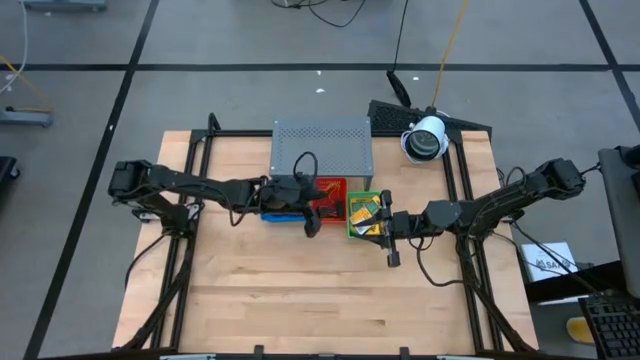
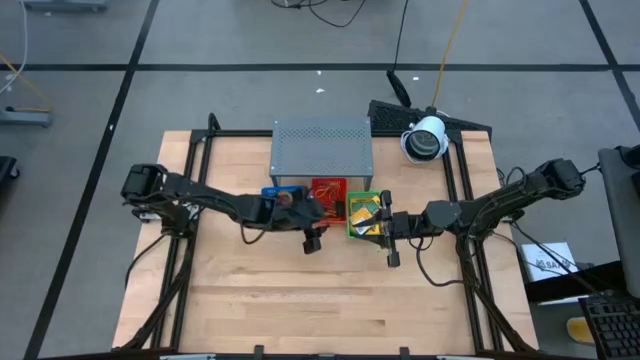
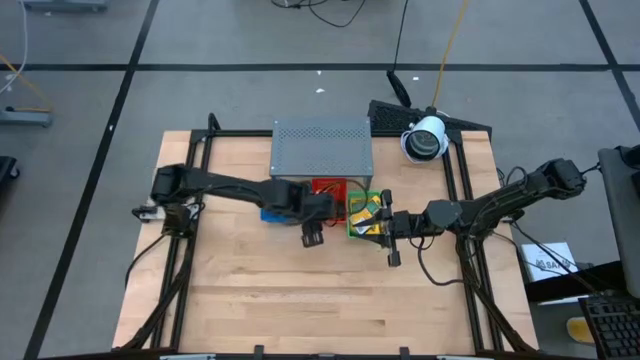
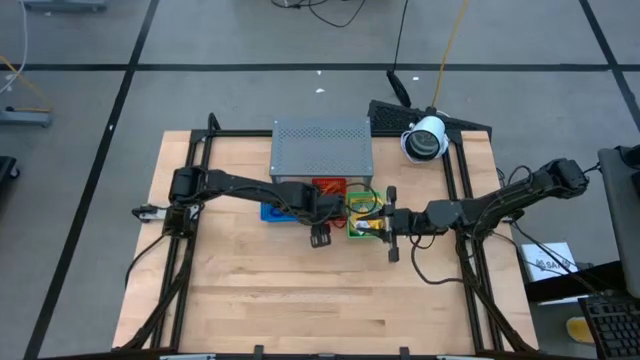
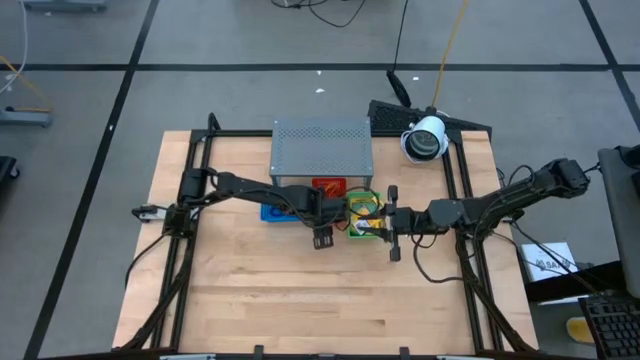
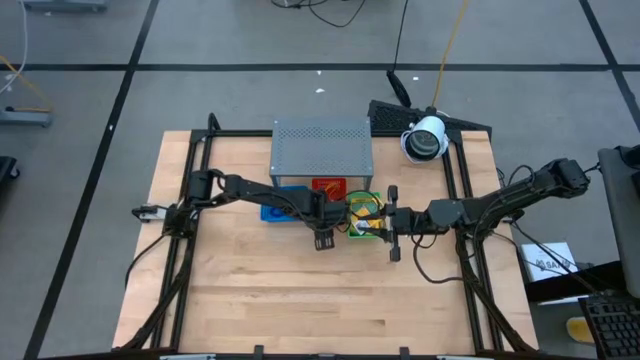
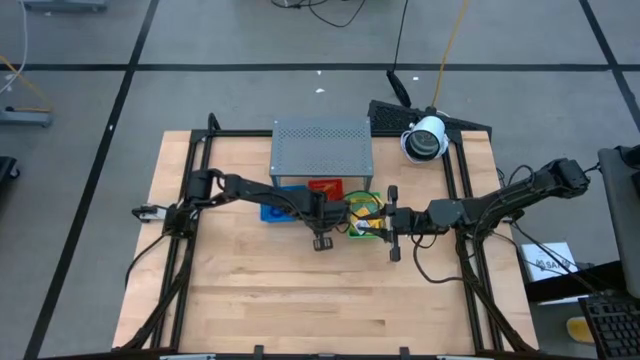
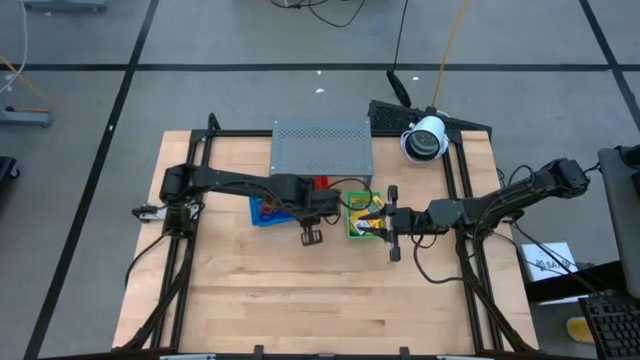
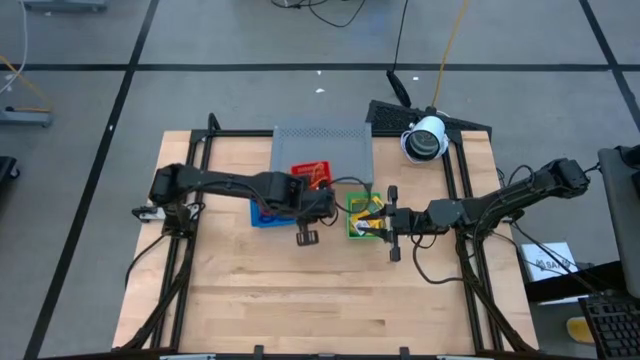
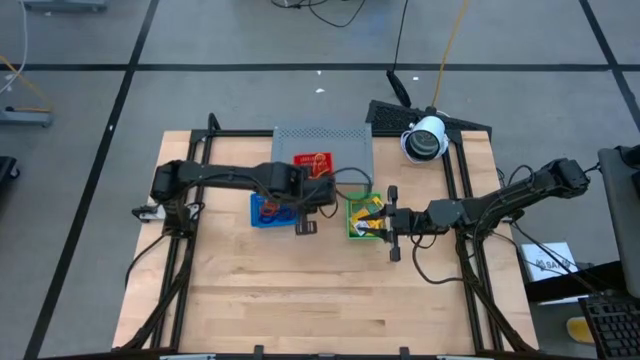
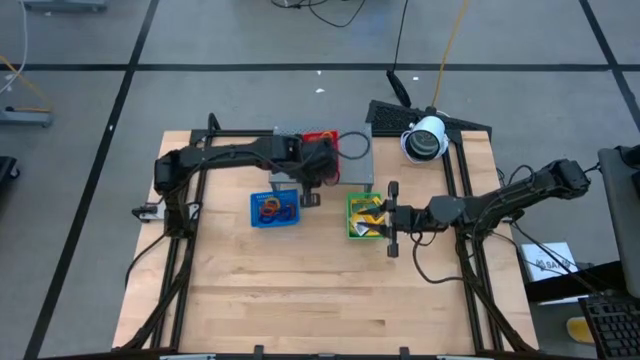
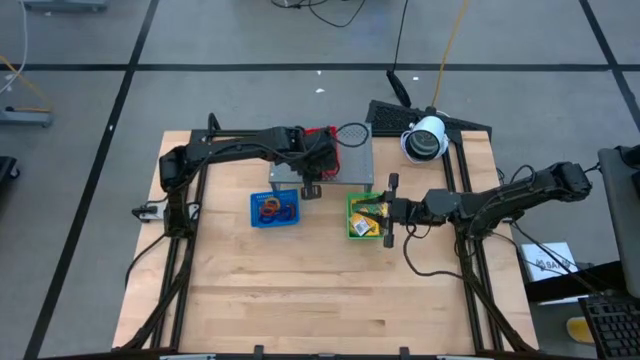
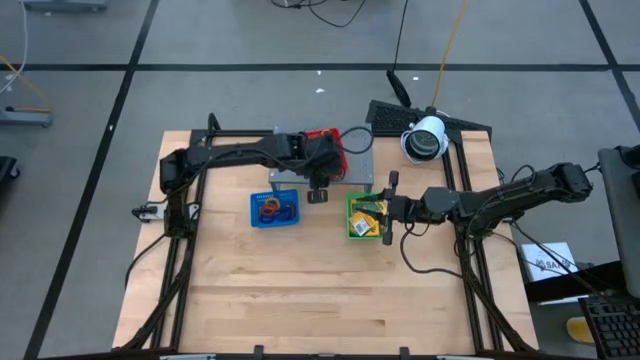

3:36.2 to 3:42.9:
Task: Pick & Place Office Desk Supplies
Put the red bin on the shelf

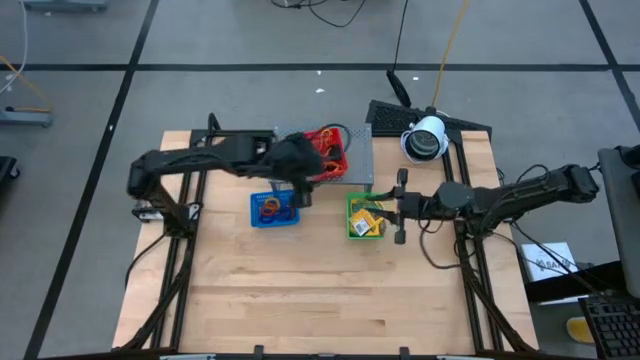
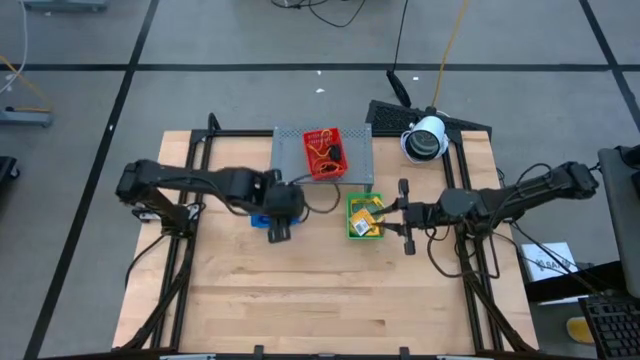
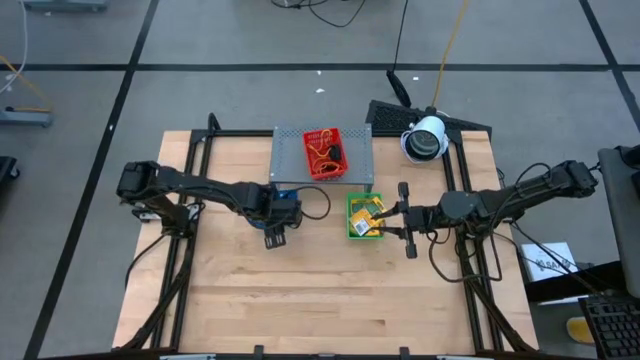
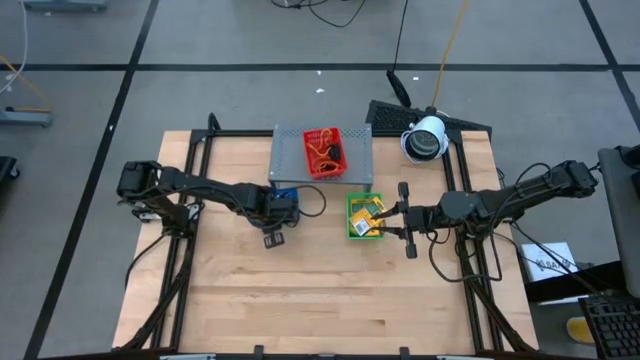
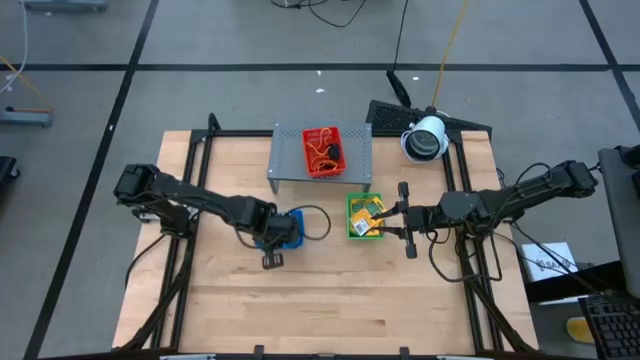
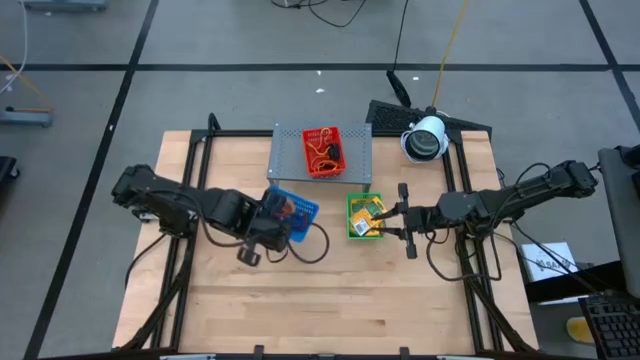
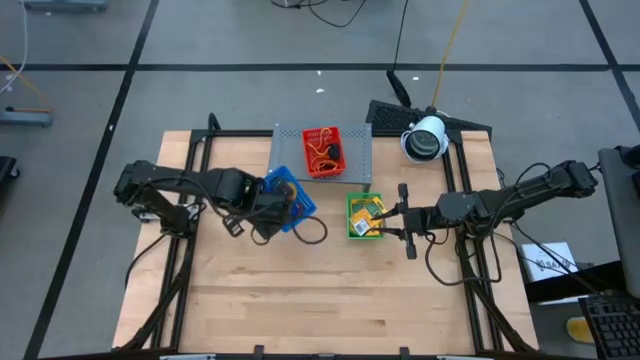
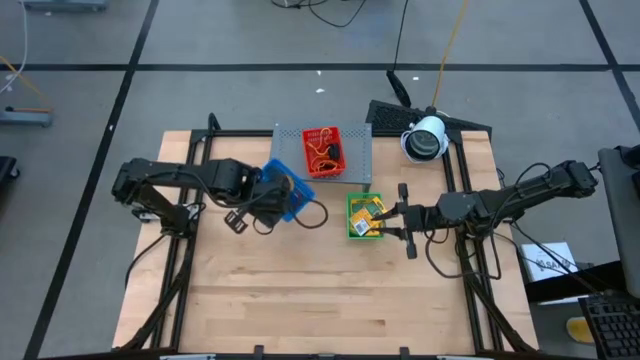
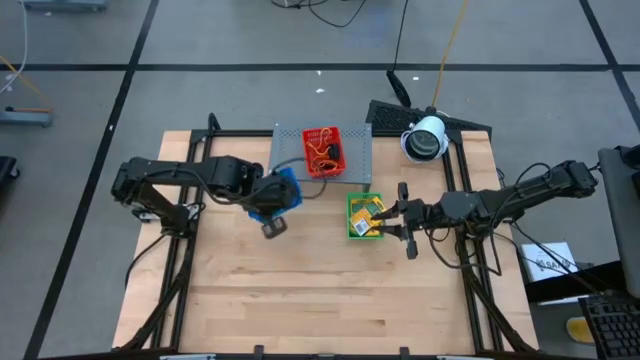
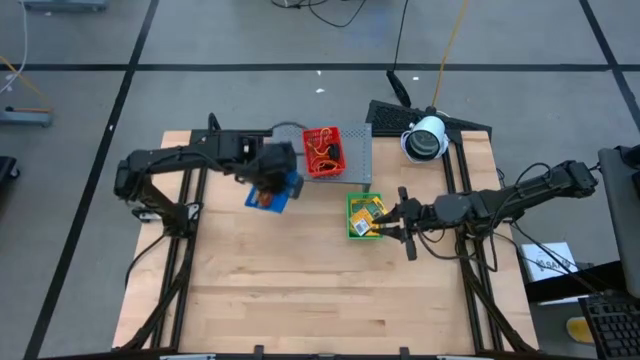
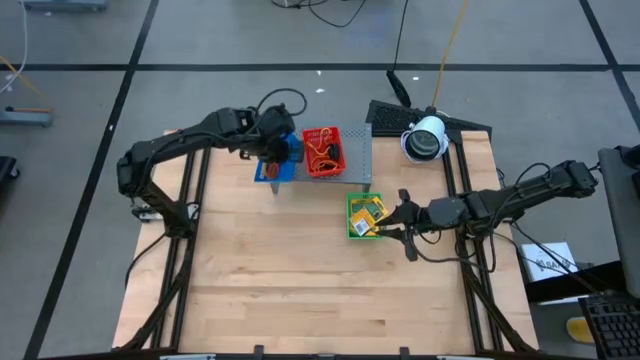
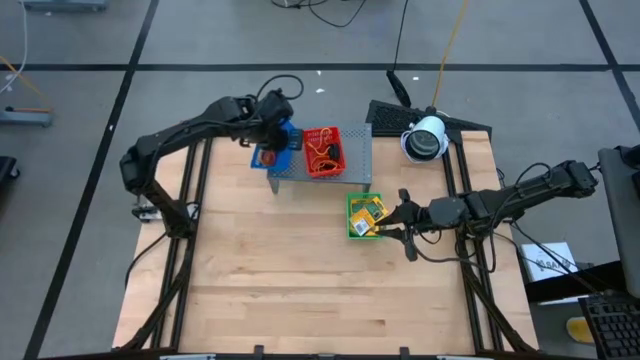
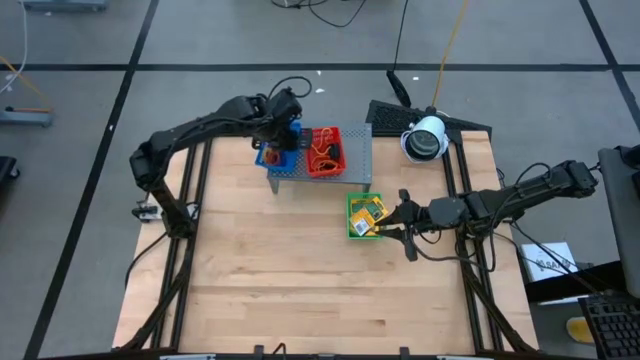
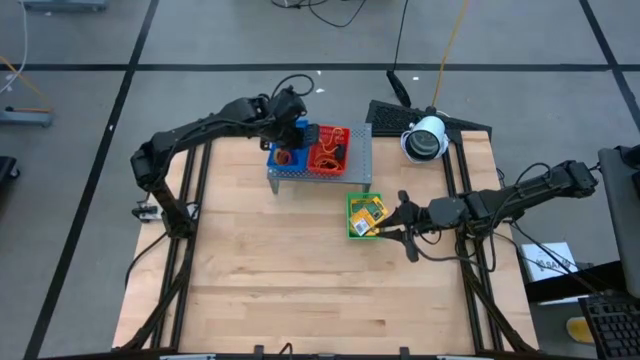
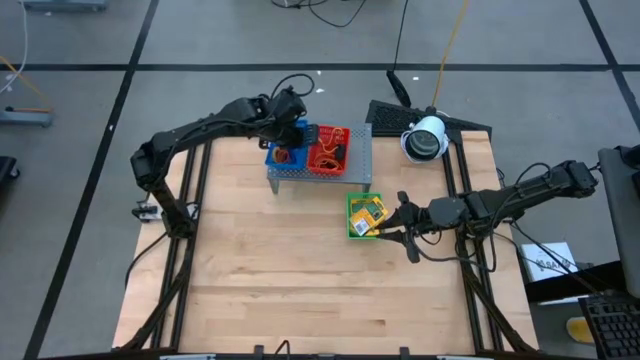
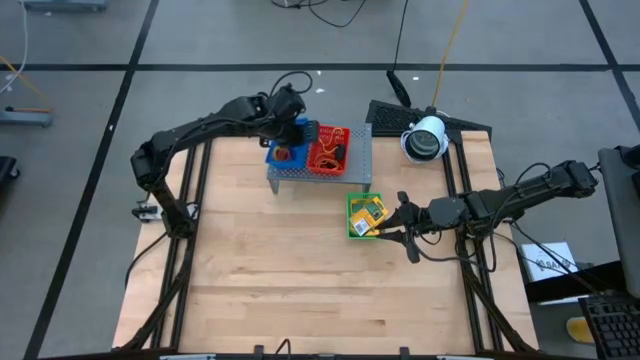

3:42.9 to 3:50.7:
Put the blue bin on the shelf

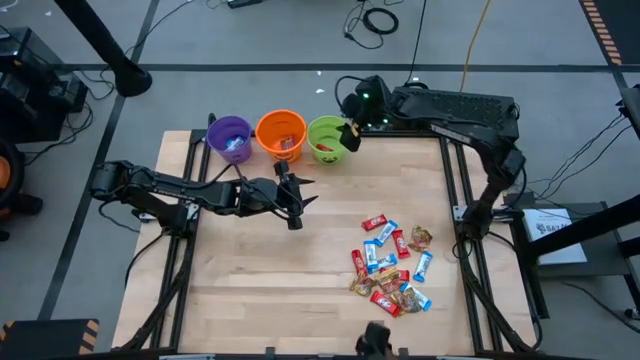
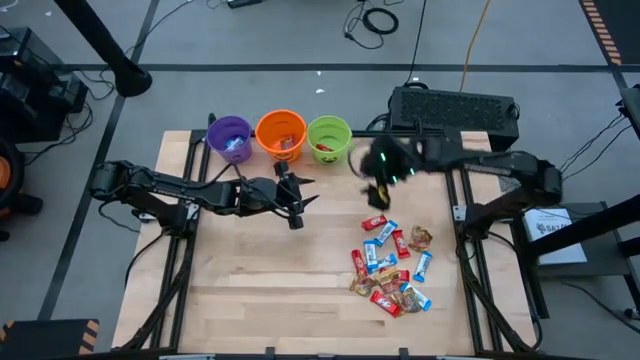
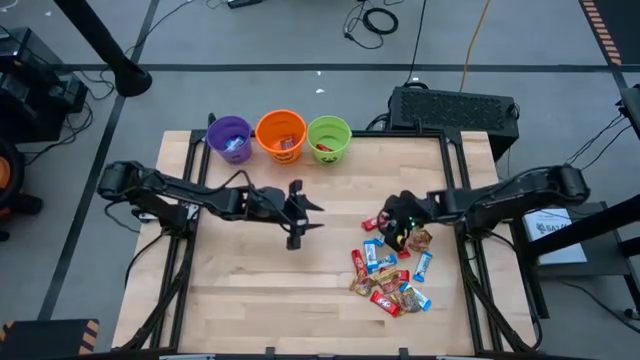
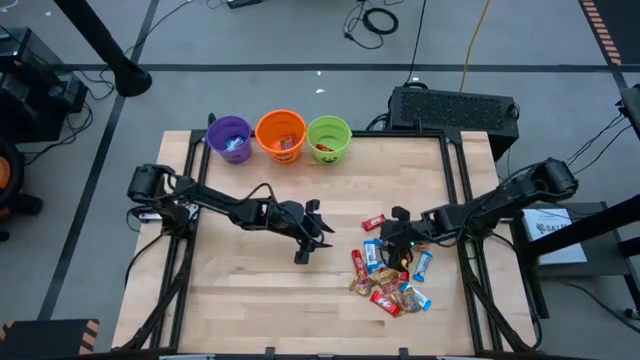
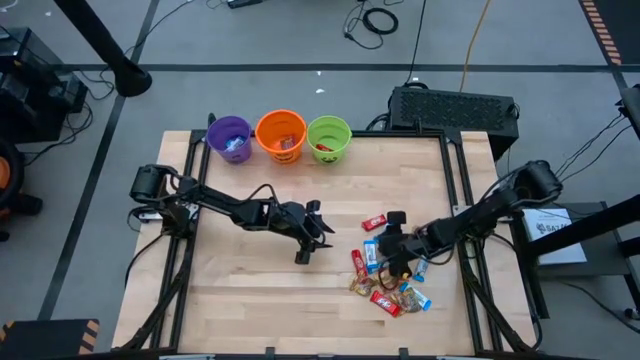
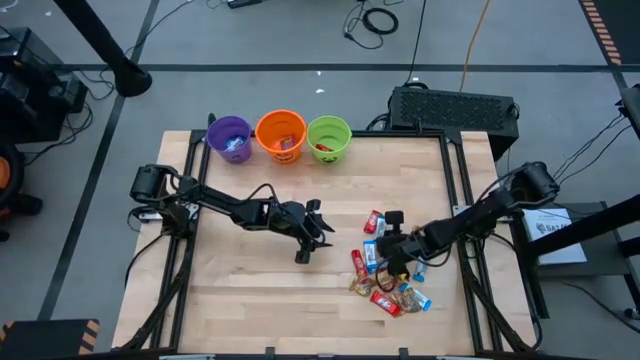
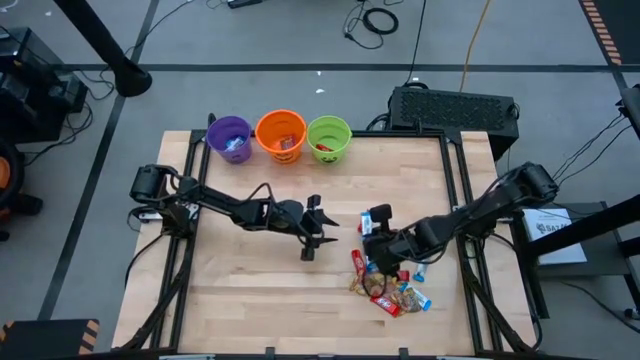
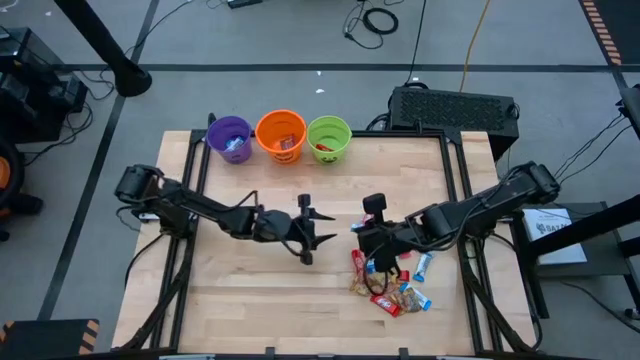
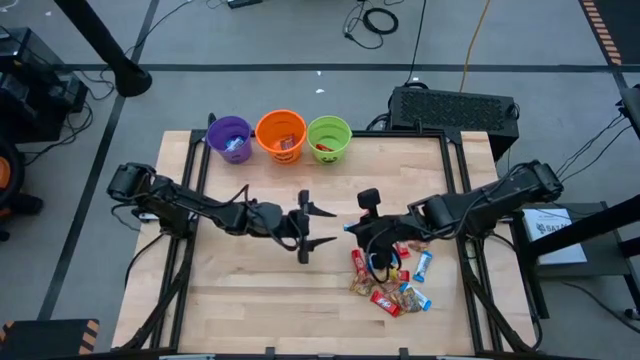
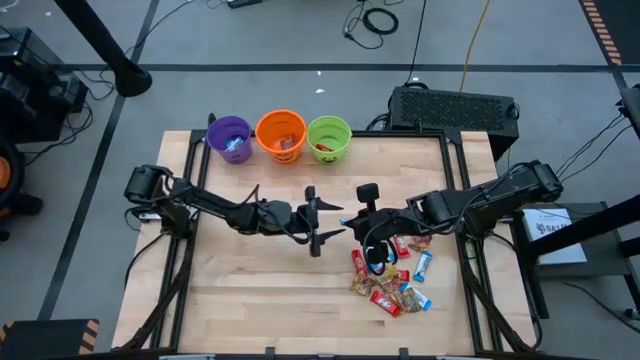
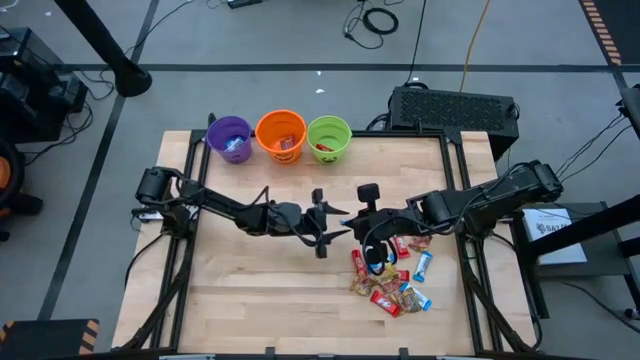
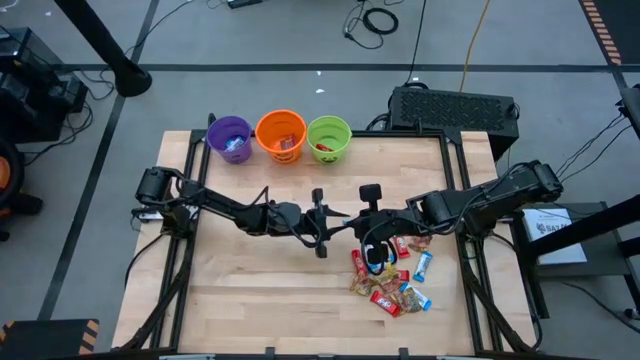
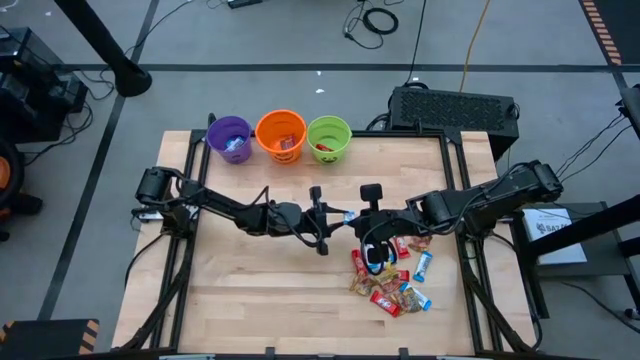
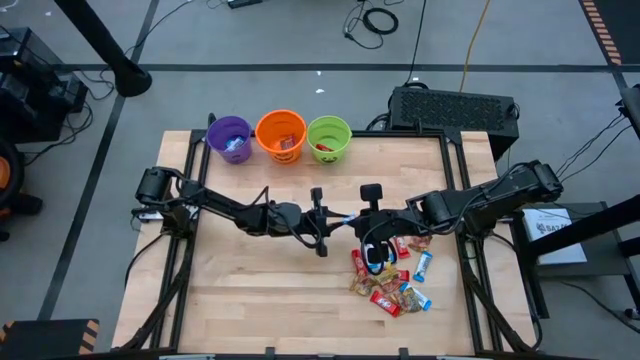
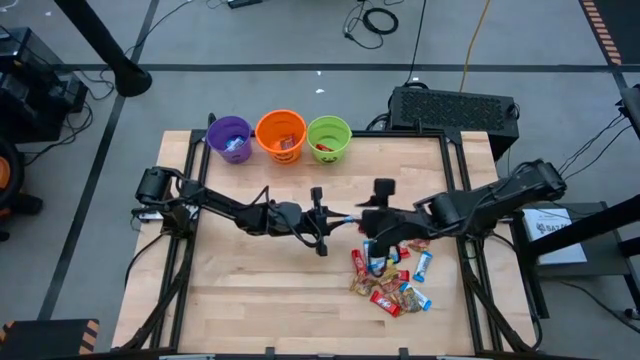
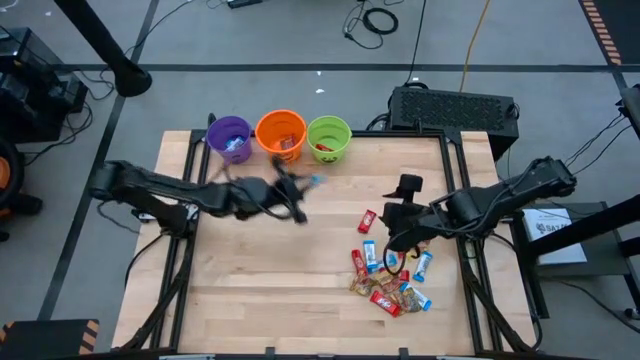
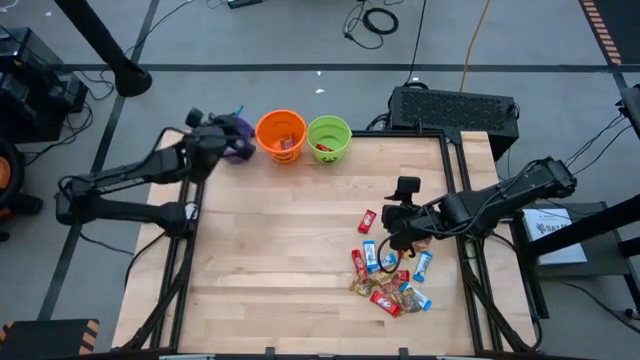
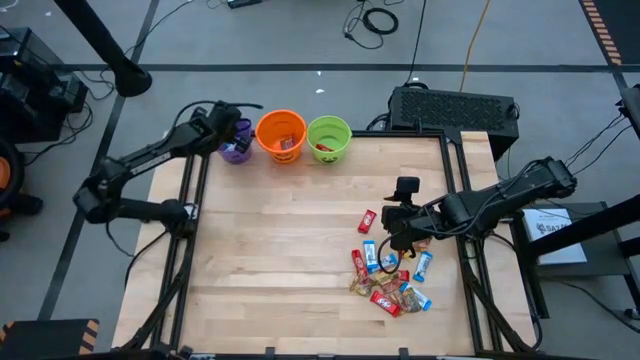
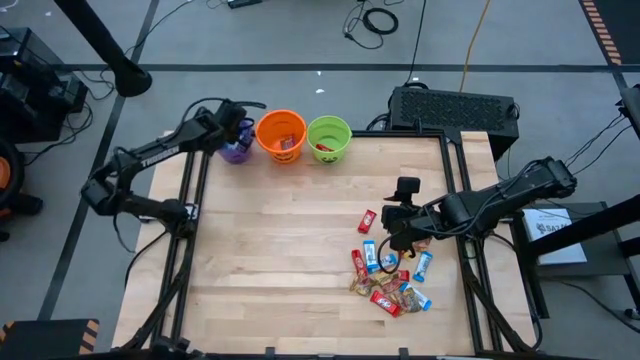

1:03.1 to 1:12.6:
Task: Sort candy by brand, put in halloween buckets
Put the white chocolate bar into the violet bucket
